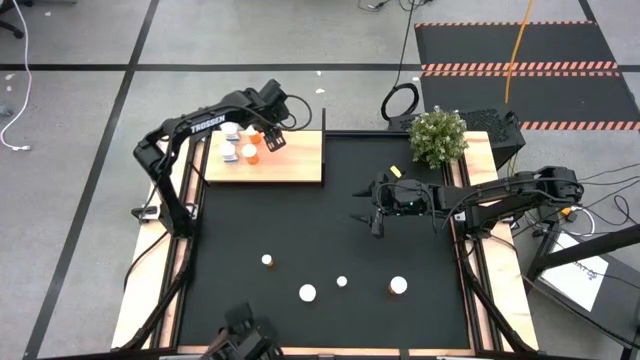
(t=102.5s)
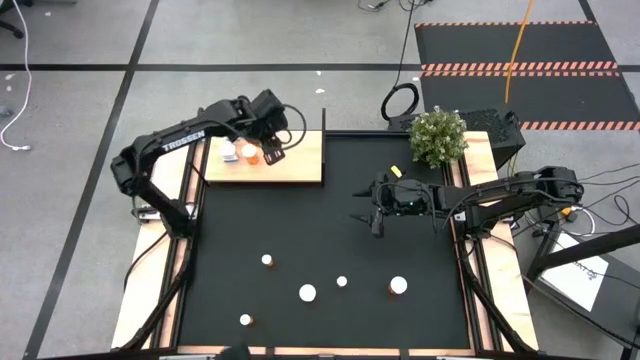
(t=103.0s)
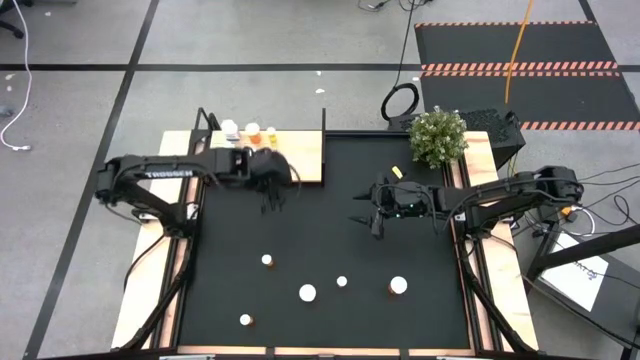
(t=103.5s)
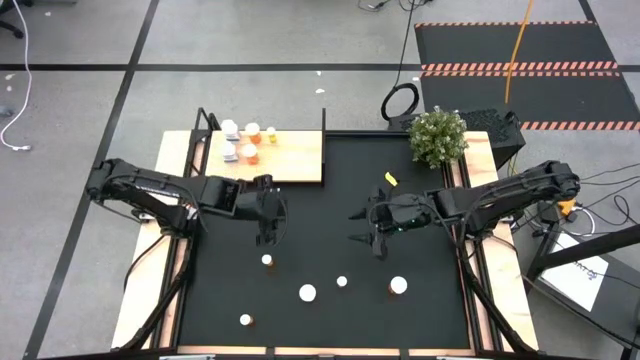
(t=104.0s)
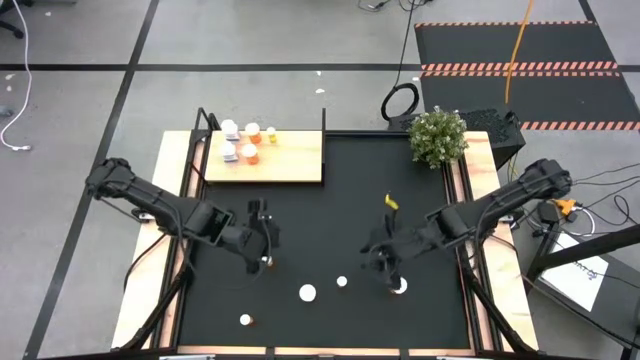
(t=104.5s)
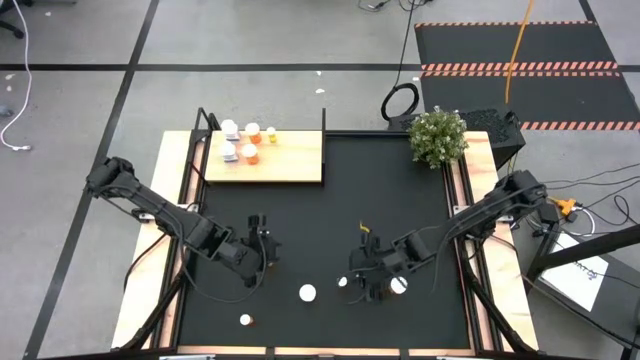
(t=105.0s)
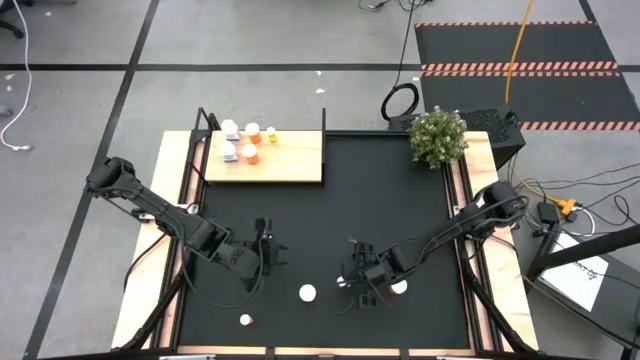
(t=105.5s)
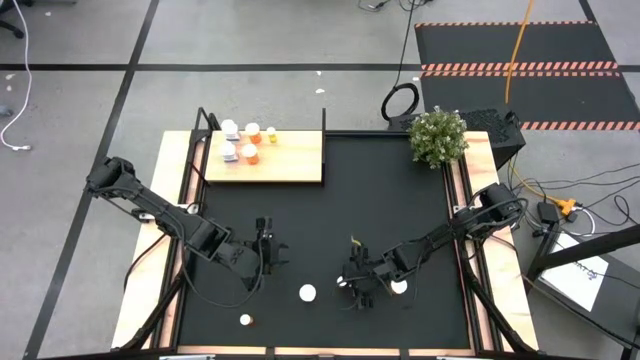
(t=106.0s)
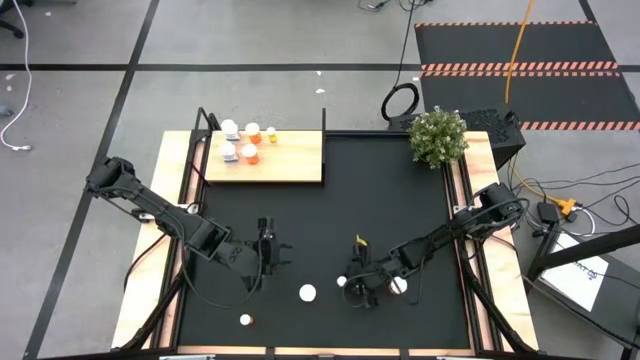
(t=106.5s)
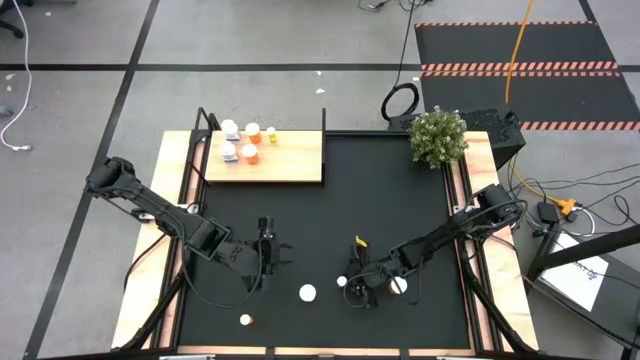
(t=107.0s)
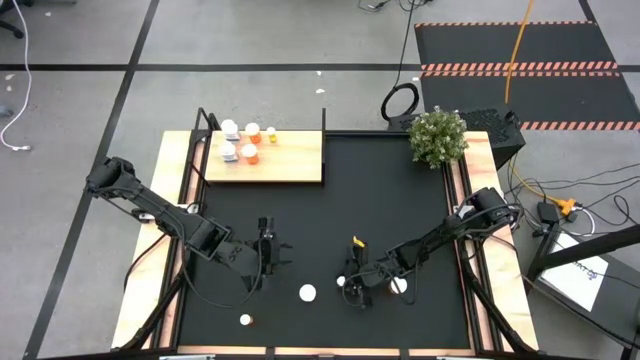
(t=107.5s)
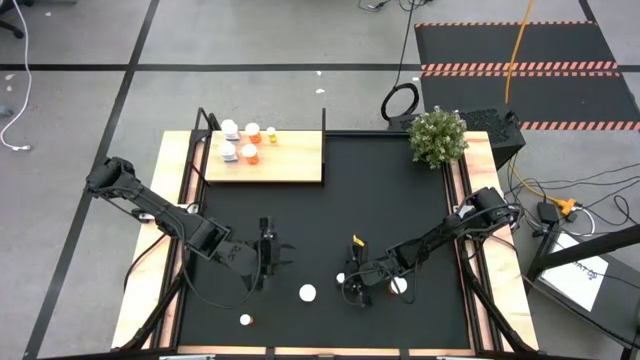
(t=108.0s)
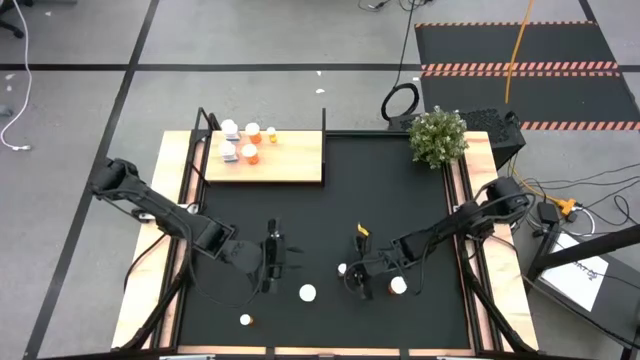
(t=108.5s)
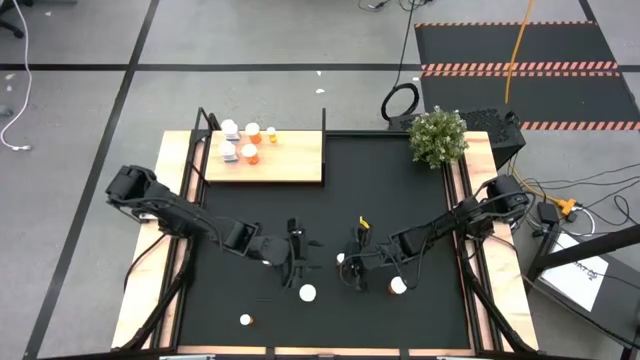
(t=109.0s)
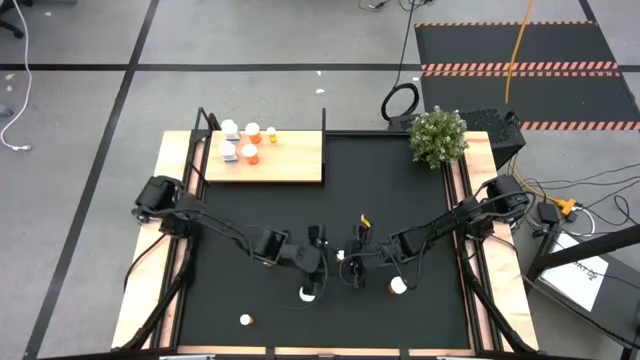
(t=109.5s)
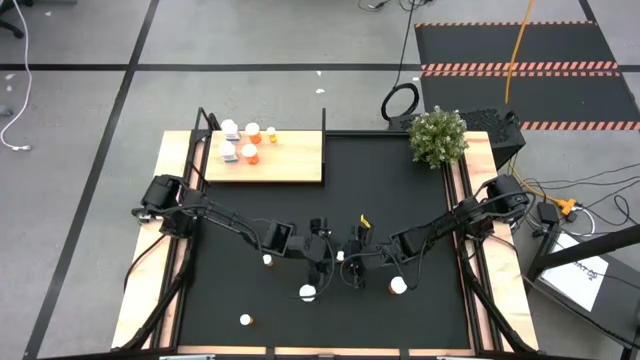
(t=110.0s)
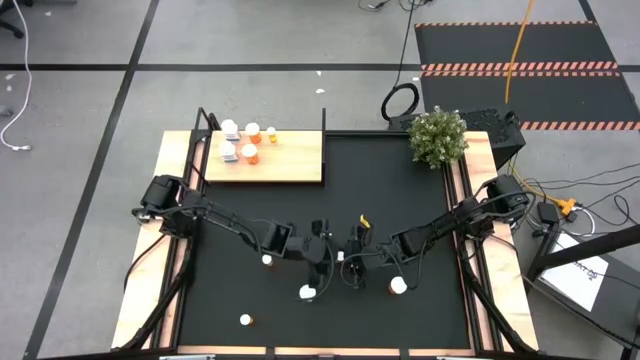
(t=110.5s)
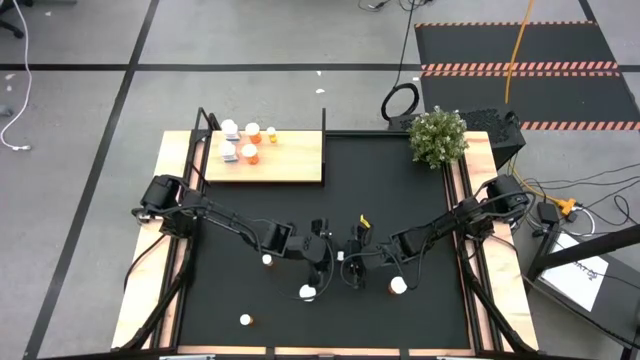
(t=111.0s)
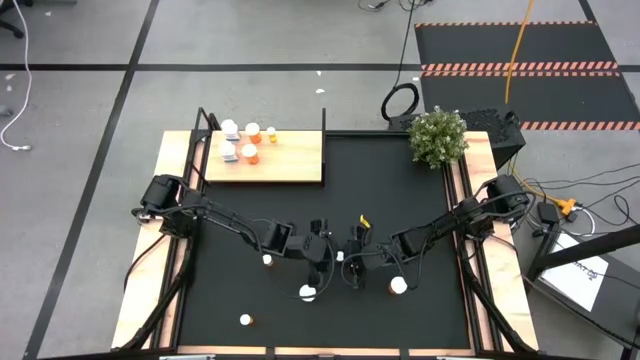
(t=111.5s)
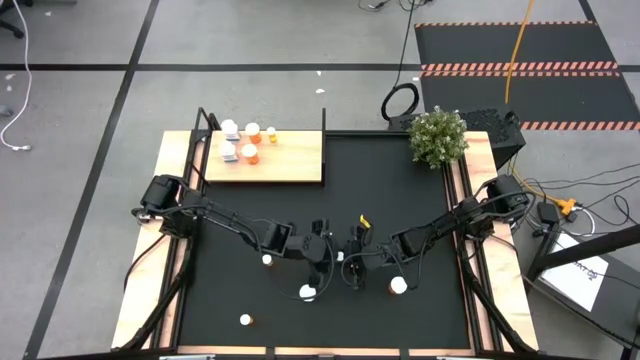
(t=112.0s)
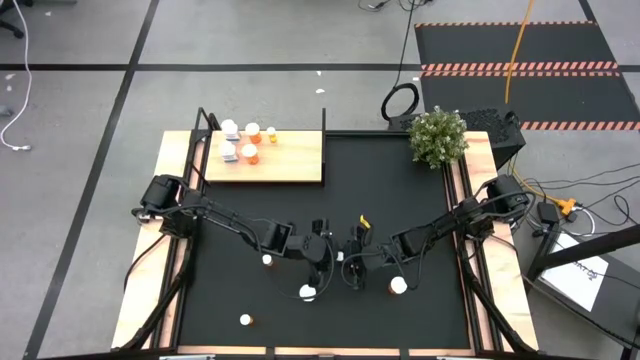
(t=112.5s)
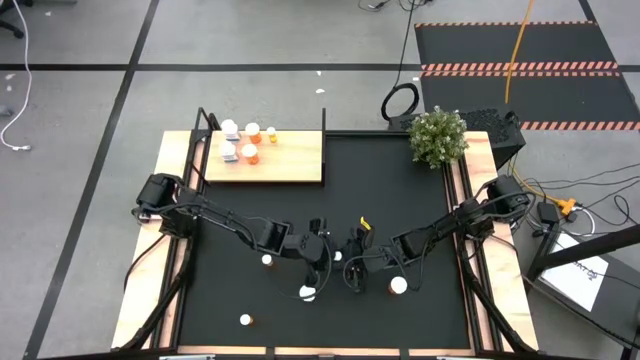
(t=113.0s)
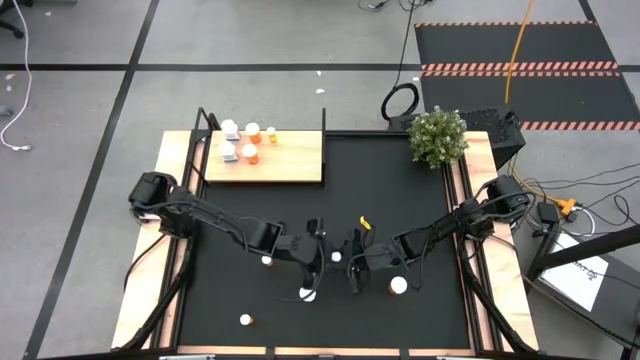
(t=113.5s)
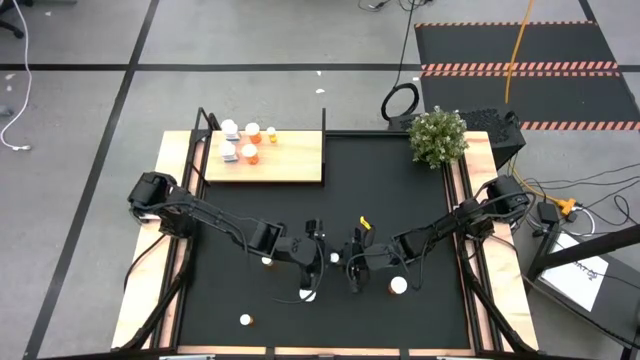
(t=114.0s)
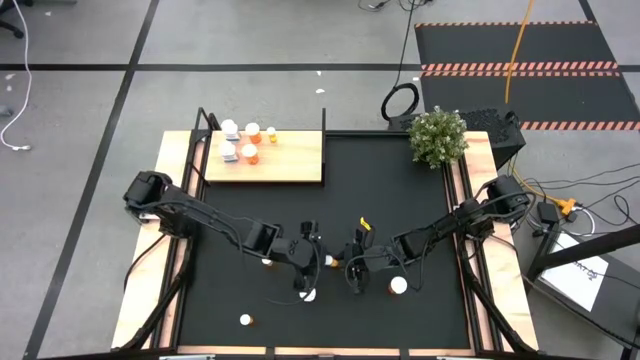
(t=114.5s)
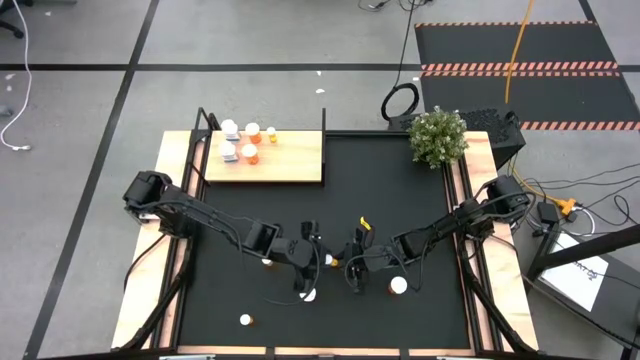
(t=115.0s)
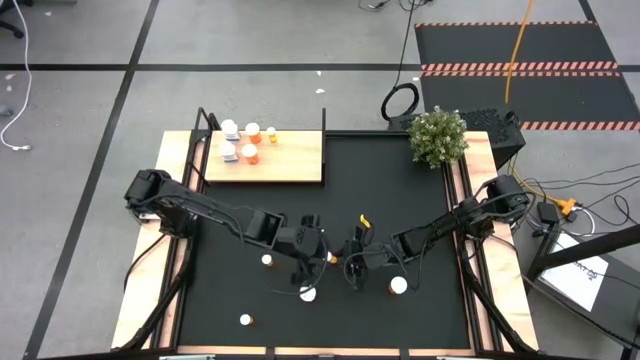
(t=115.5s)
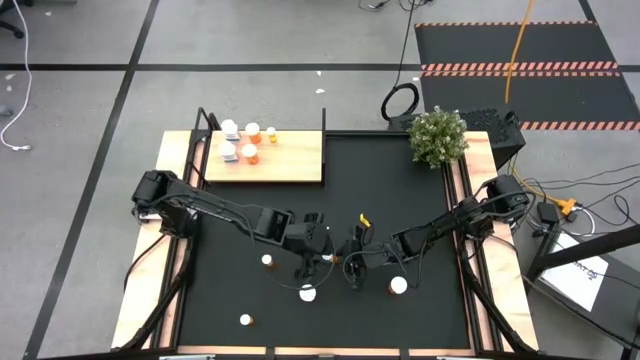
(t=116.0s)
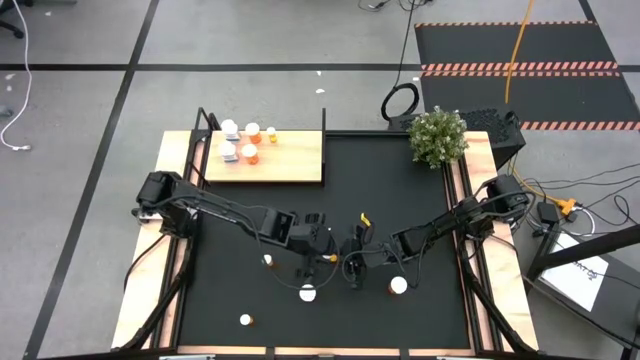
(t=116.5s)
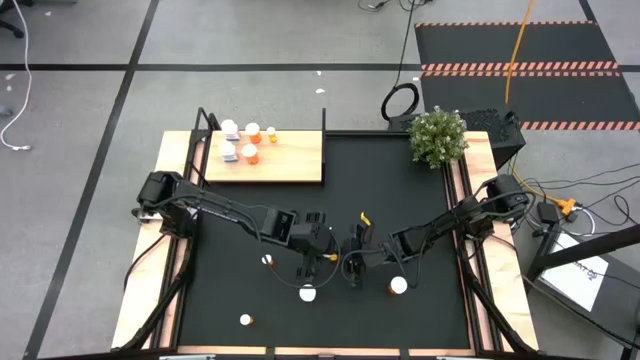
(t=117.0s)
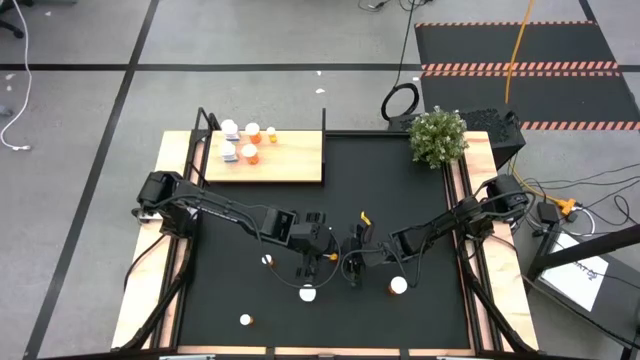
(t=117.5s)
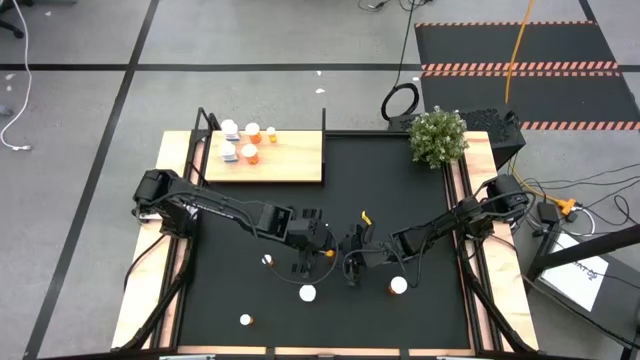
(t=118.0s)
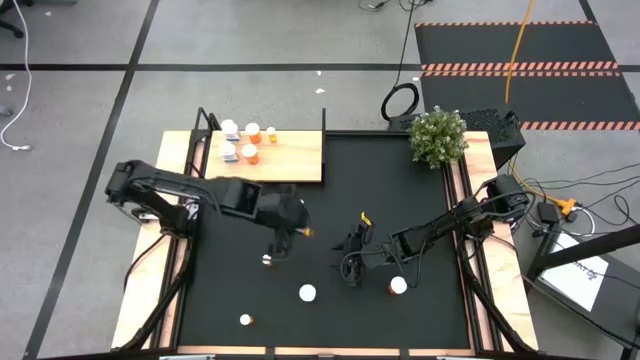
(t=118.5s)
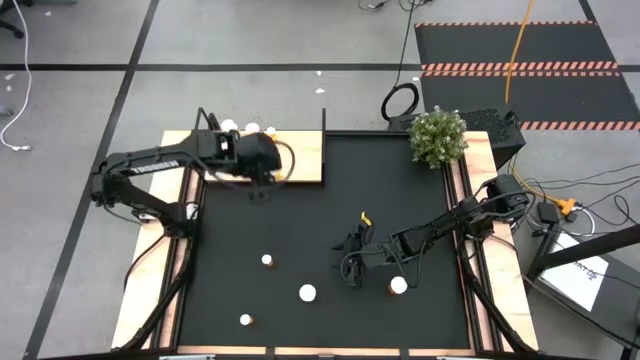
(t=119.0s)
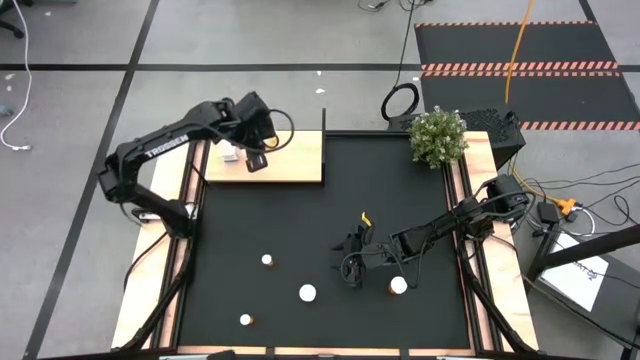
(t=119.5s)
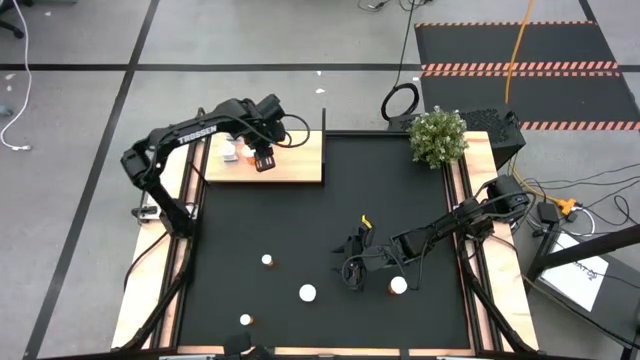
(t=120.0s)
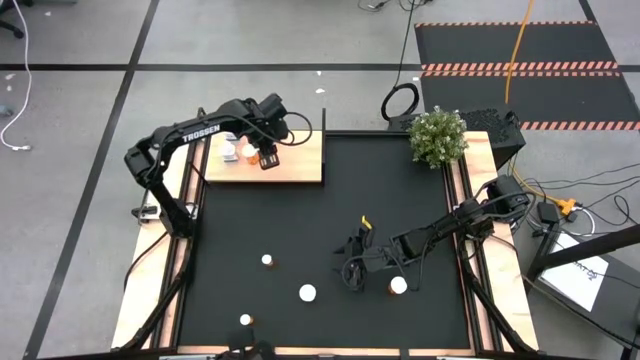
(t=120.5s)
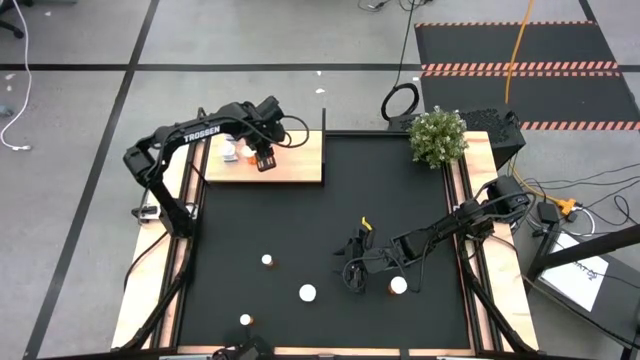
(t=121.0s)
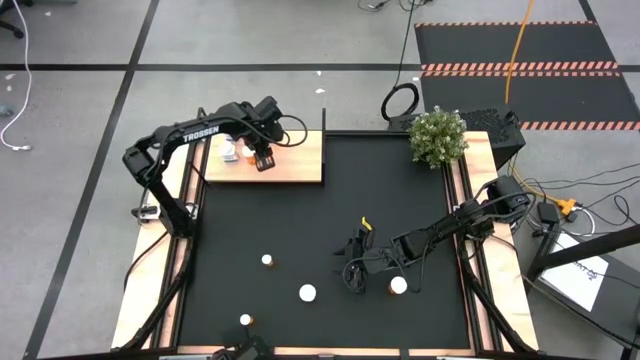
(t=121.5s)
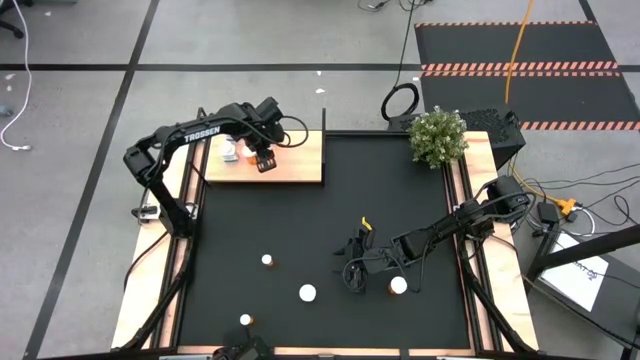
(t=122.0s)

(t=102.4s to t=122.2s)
Task: Pick and place medicine bottles onto shelf by color
Put the small orange pill bottle aligned with the other small orange pill bottle on the shelf

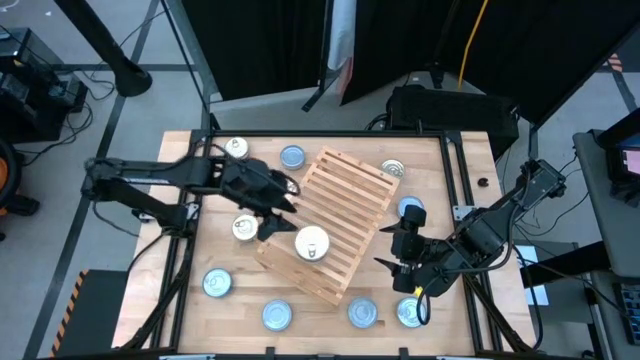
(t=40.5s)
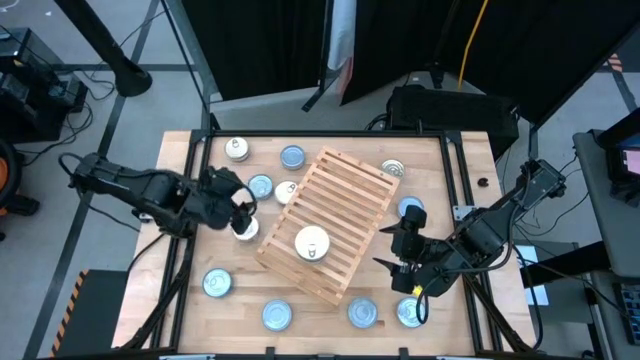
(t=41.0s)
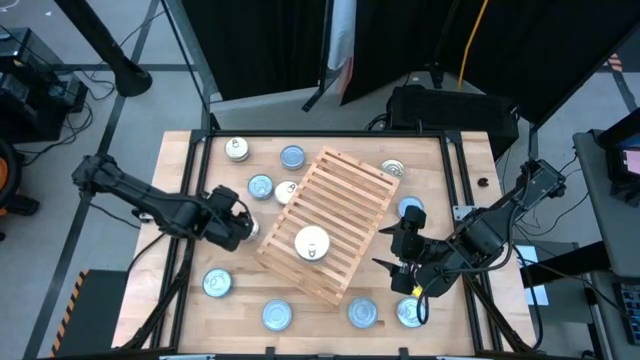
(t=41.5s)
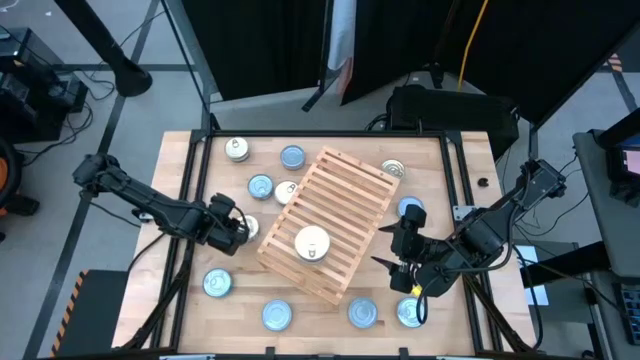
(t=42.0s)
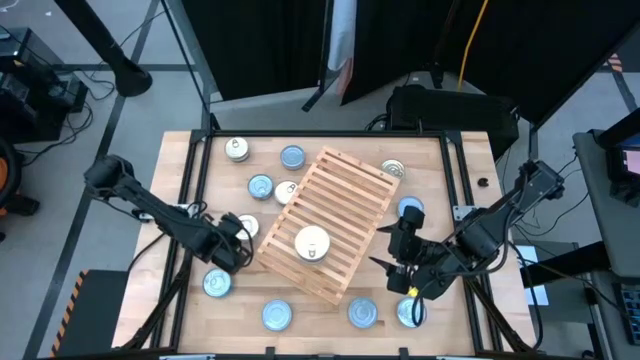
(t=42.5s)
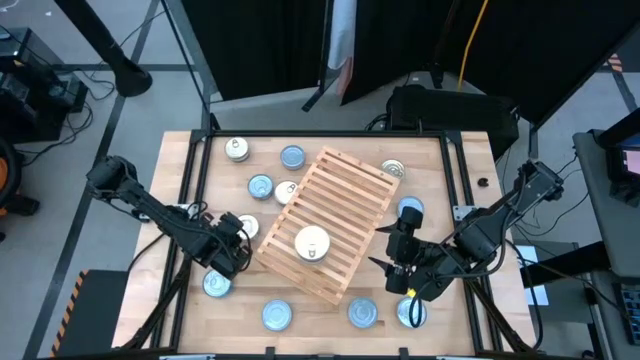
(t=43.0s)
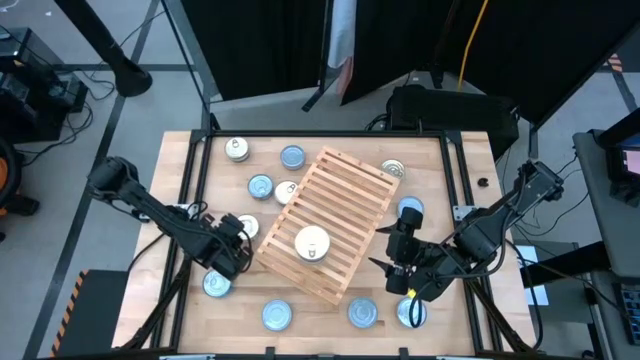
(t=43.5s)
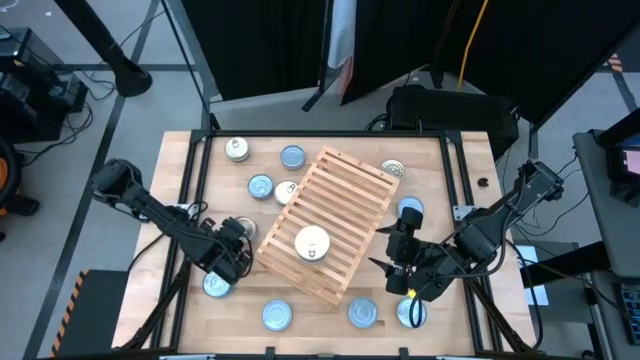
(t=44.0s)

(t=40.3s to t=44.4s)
Task: Stack canned seafood by type on shelf
Stack the blue-pink tuna can on top of the other blue-pink tuna can on the shelf
